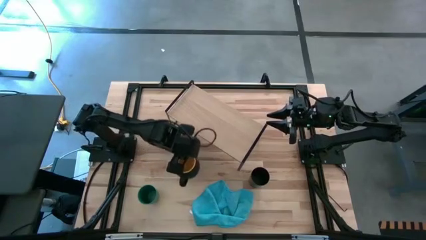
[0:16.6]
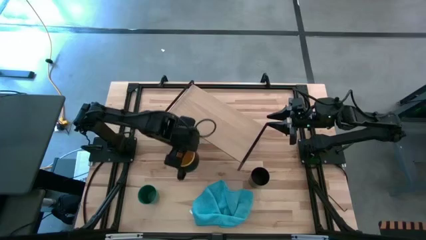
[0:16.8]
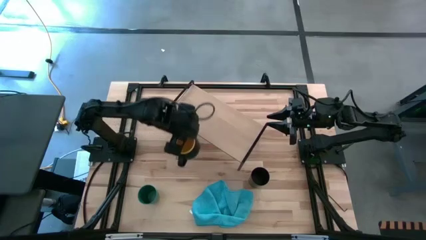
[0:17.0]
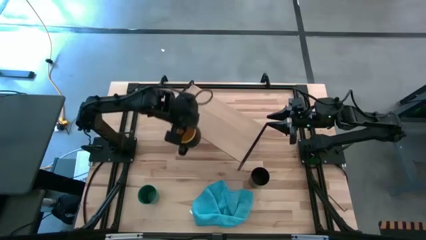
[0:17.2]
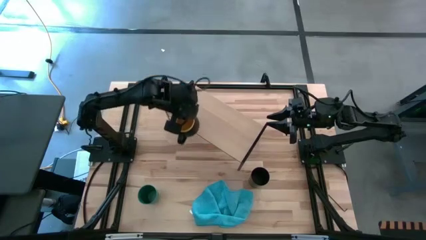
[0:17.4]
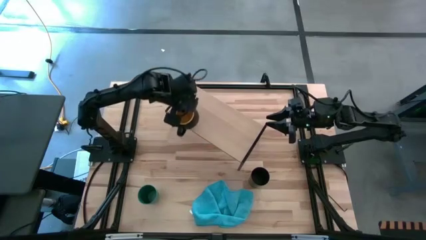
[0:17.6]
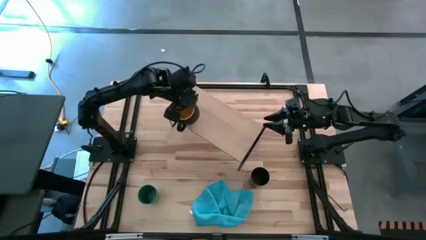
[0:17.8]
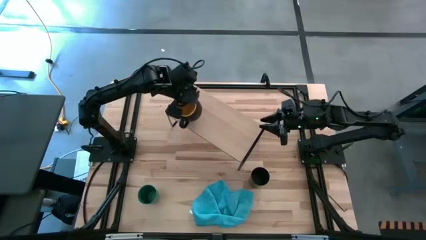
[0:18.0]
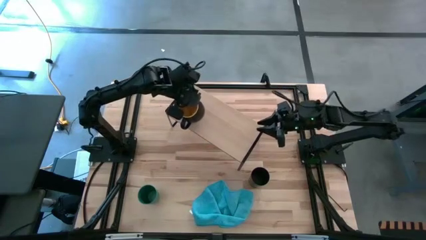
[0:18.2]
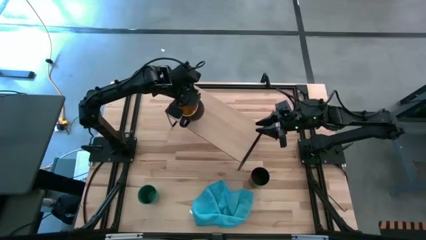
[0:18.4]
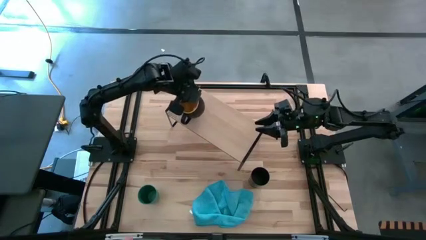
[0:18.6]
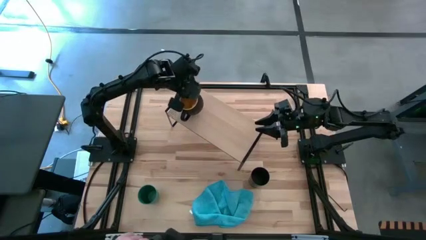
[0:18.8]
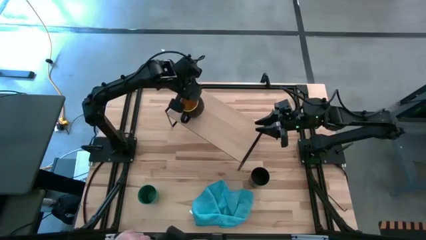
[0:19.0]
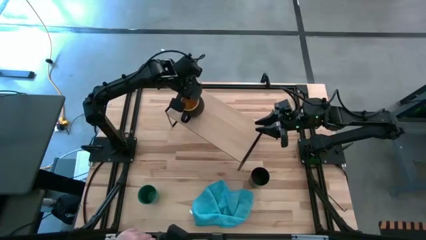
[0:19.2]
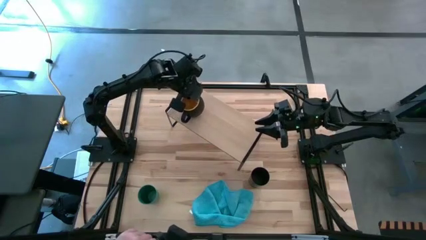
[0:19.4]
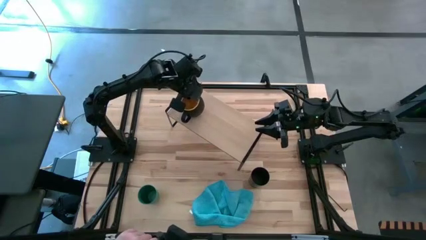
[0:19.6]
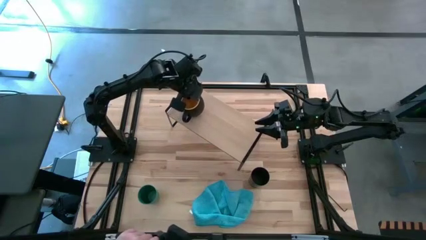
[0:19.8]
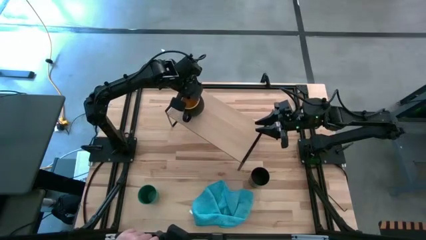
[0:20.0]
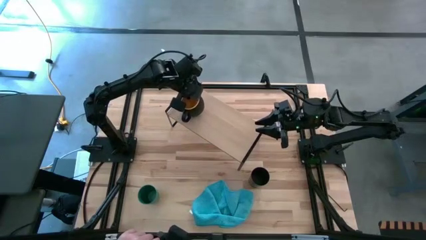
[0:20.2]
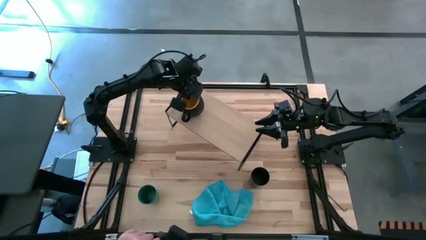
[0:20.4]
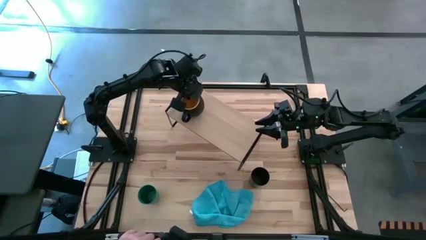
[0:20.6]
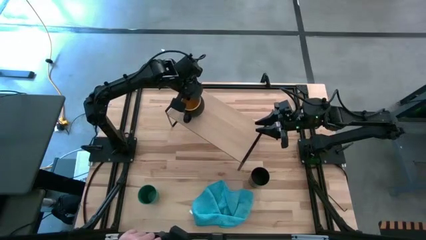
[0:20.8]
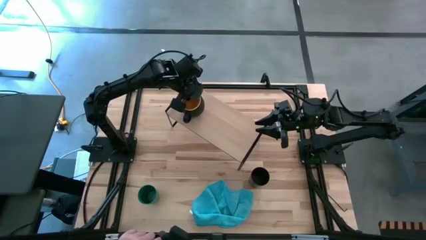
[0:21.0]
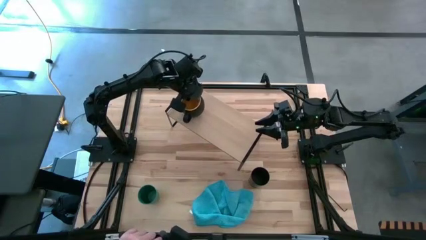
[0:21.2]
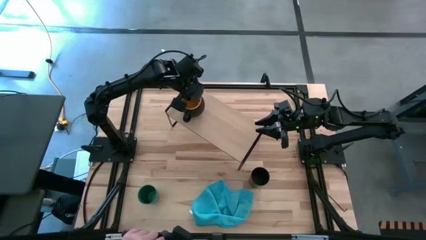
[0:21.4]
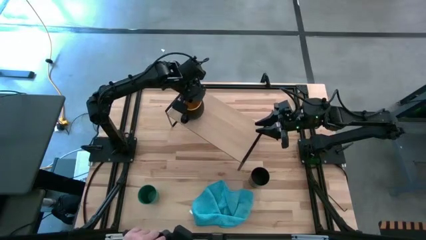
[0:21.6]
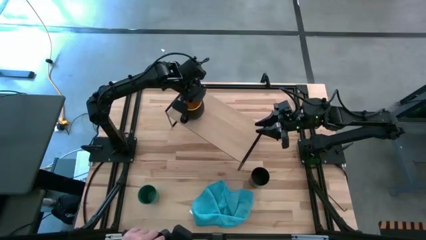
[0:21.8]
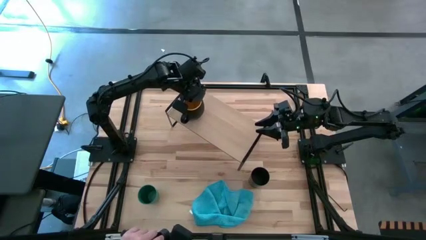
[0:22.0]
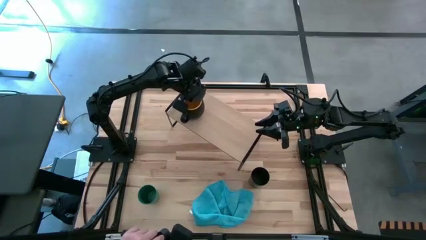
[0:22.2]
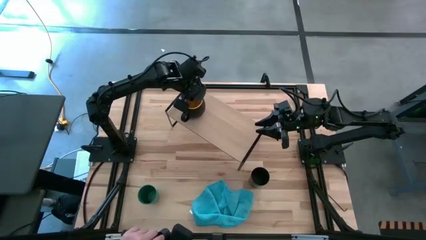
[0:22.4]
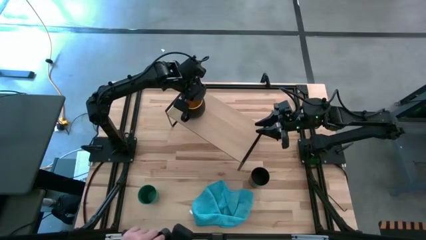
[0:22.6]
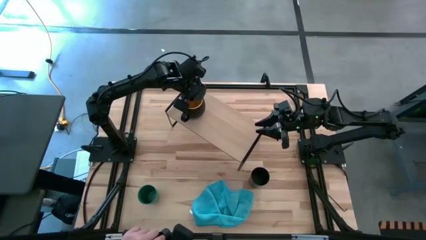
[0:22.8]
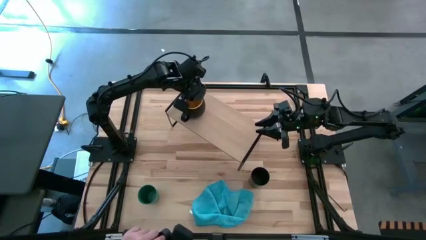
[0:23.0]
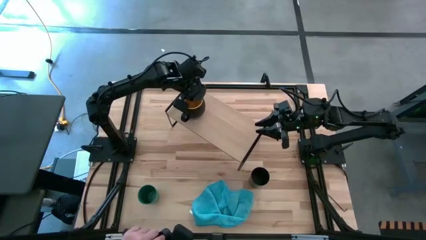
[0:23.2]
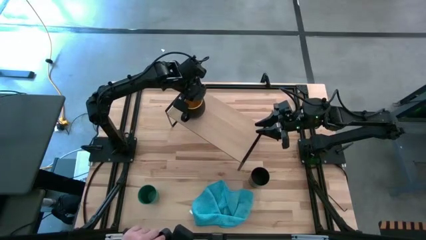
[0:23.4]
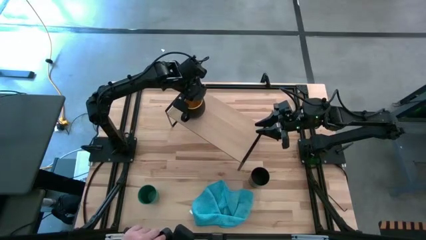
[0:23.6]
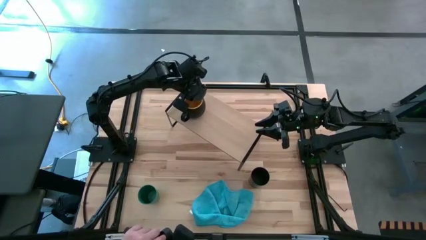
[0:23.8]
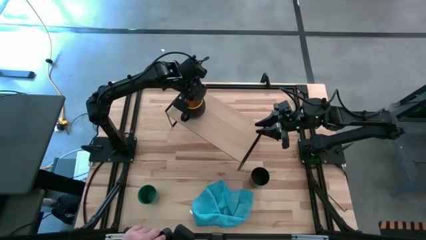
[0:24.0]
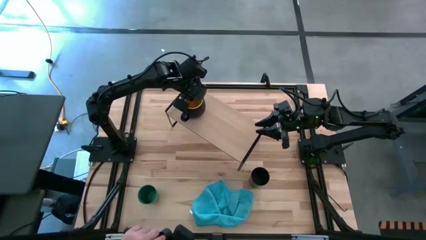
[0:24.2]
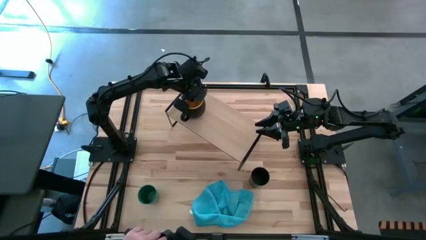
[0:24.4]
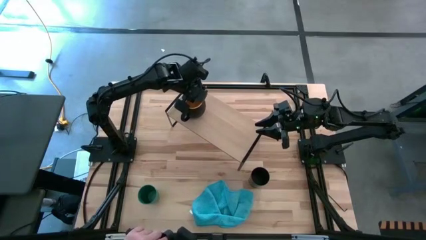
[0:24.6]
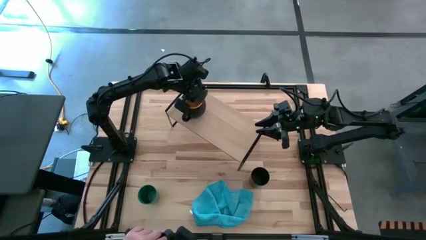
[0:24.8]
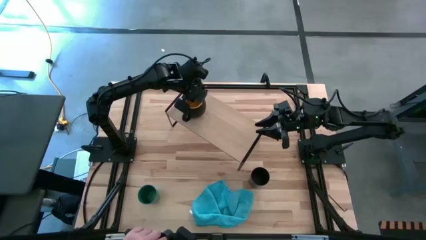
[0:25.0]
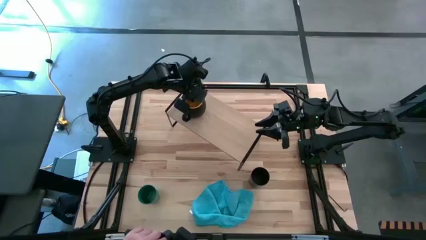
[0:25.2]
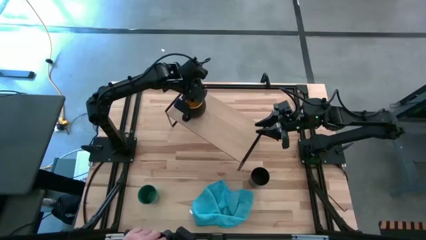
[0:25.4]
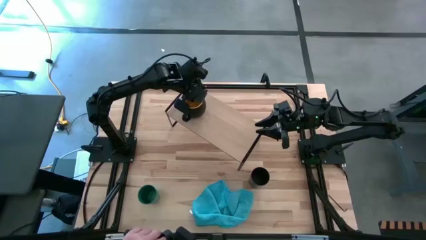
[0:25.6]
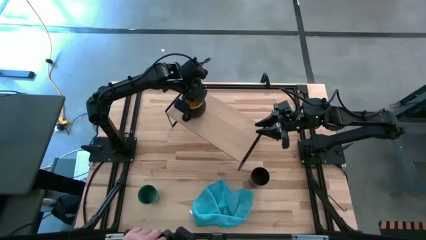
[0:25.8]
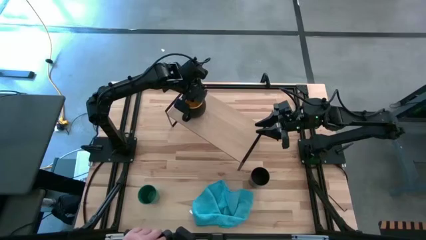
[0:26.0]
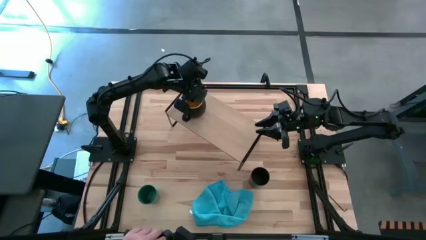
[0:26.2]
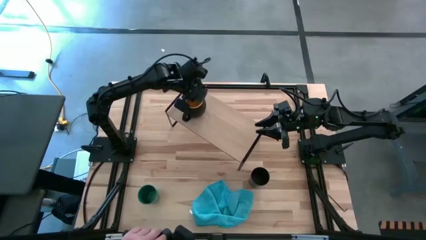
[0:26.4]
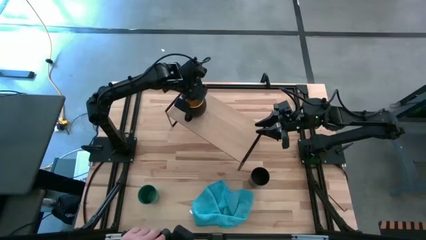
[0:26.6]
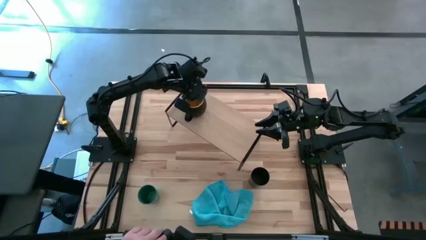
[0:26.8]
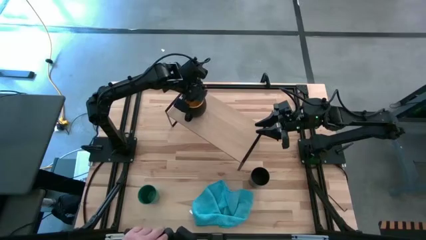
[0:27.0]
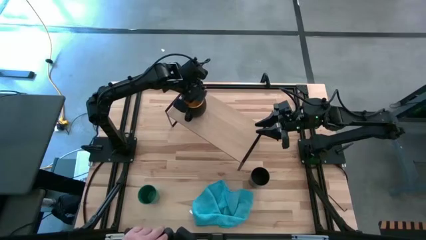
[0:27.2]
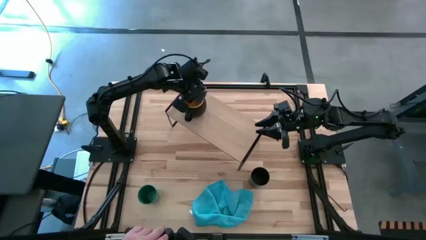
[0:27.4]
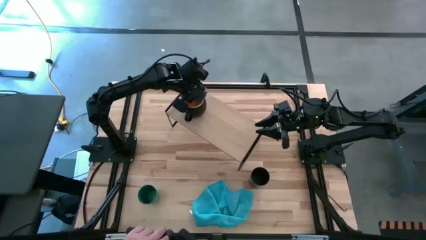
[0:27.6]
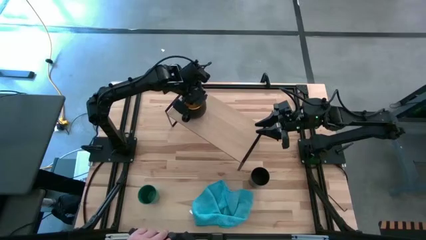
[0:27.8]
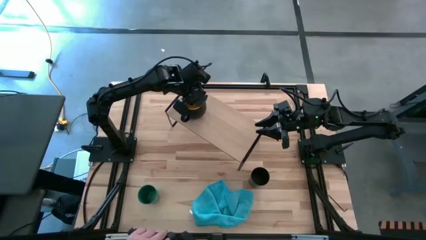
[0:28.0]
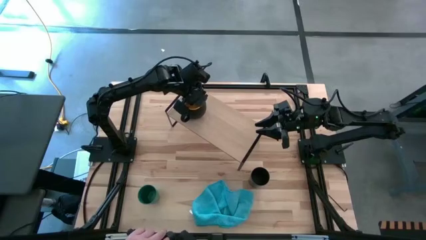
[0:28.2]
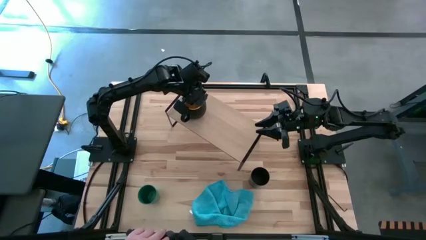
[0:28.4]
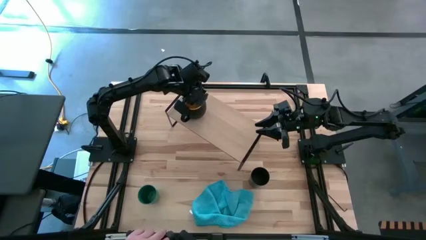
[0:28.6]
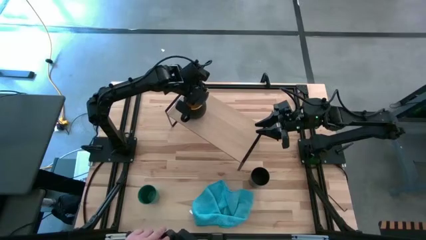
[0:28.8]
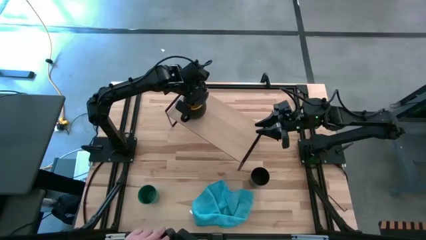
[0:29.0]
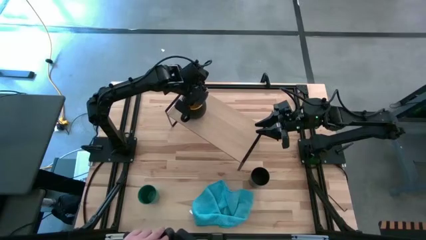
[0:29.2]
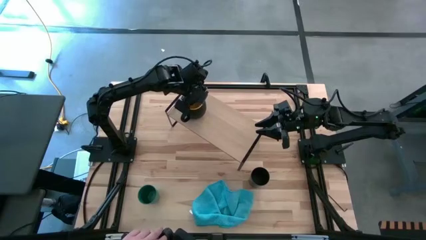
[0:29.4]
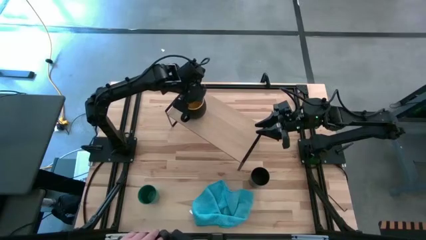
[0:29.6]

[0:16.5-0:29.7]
Task: Stack small to large cups/mugs on shelf
Put the black mug on the shelf
